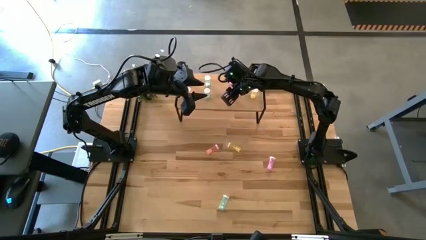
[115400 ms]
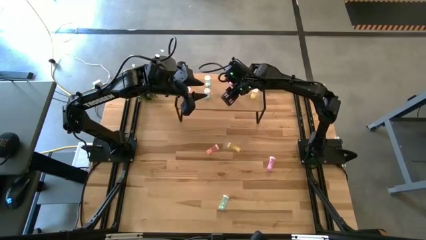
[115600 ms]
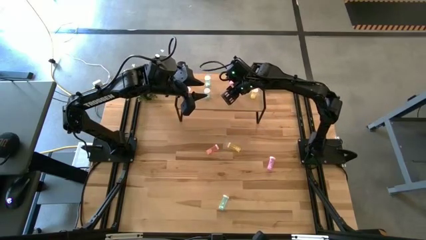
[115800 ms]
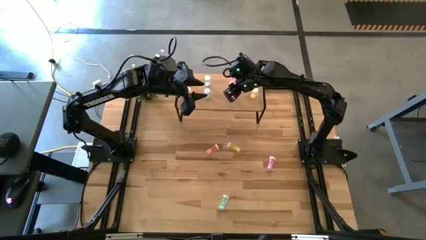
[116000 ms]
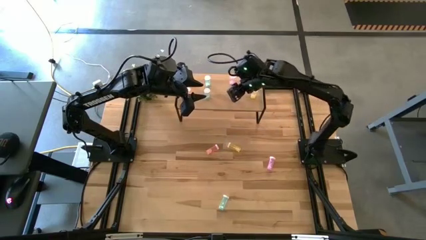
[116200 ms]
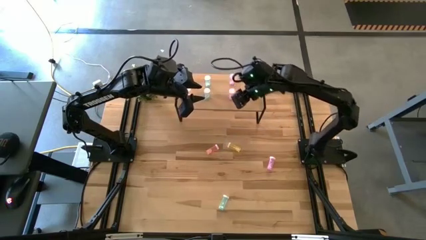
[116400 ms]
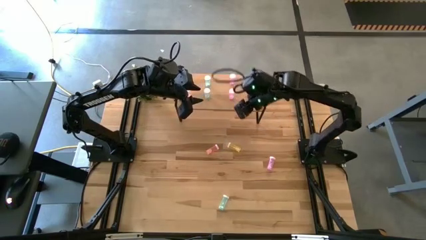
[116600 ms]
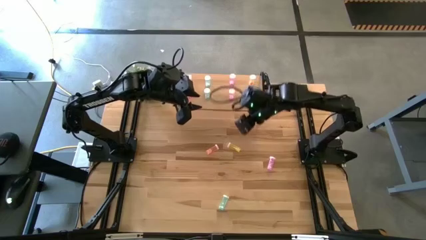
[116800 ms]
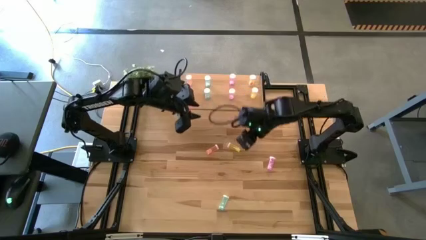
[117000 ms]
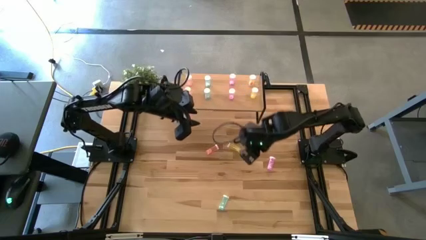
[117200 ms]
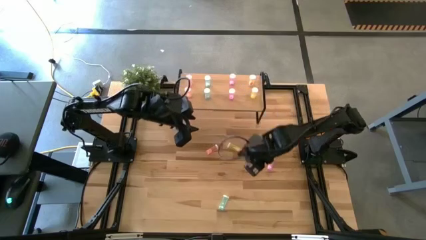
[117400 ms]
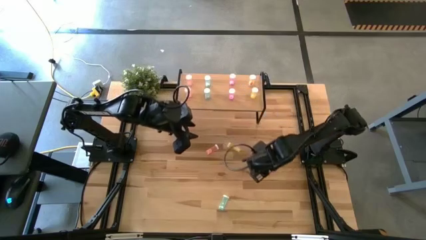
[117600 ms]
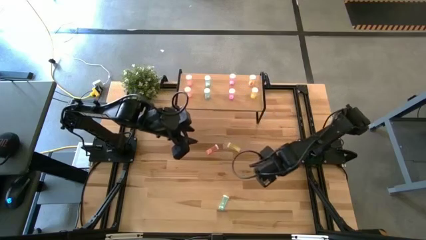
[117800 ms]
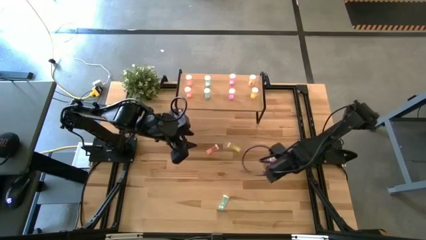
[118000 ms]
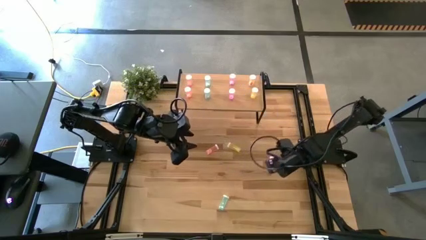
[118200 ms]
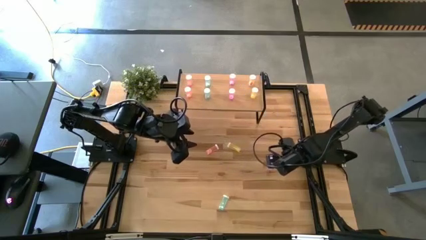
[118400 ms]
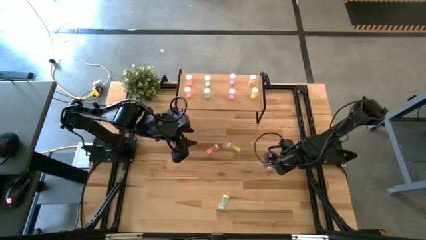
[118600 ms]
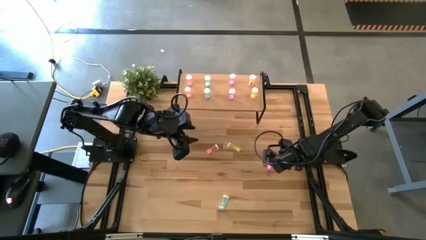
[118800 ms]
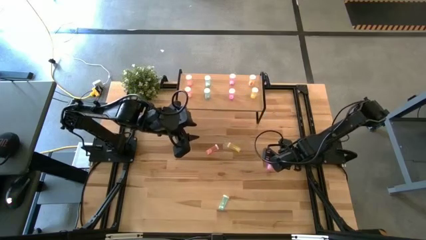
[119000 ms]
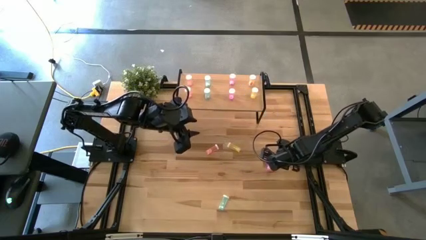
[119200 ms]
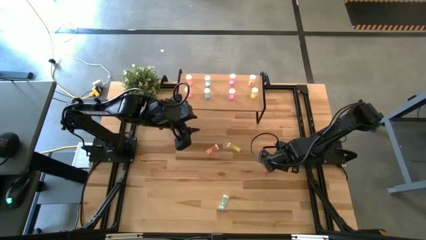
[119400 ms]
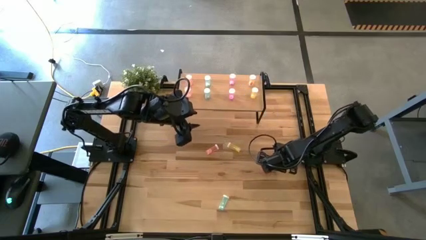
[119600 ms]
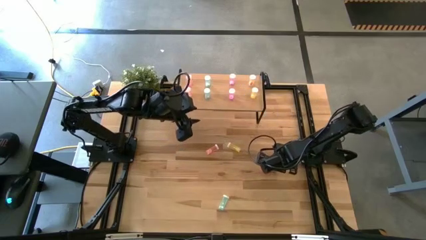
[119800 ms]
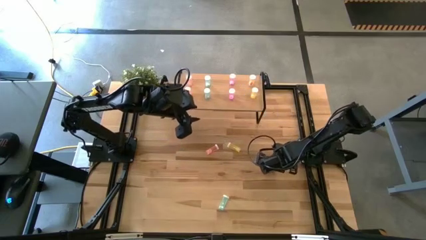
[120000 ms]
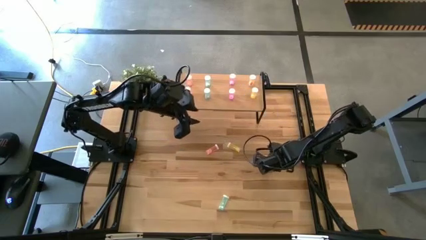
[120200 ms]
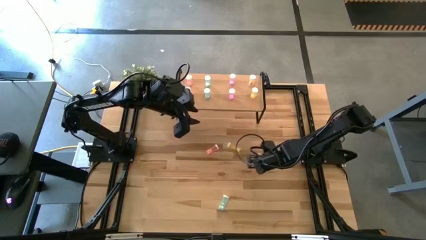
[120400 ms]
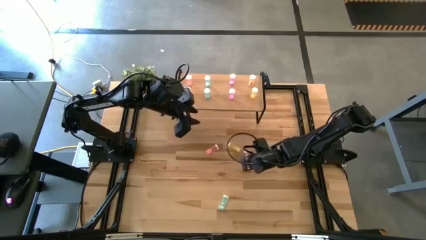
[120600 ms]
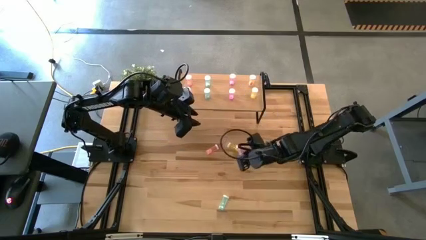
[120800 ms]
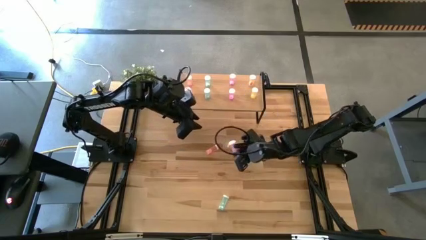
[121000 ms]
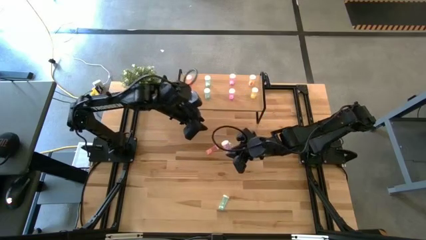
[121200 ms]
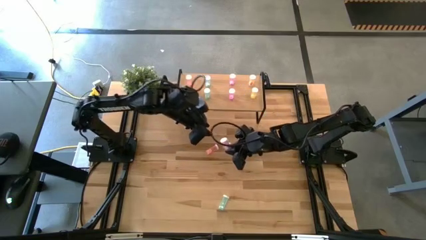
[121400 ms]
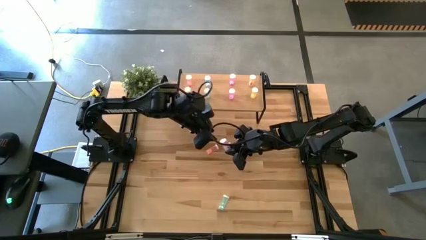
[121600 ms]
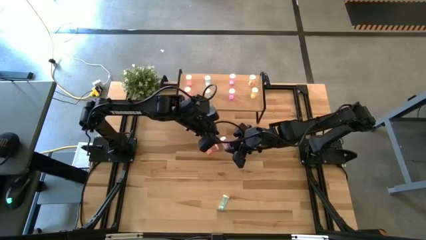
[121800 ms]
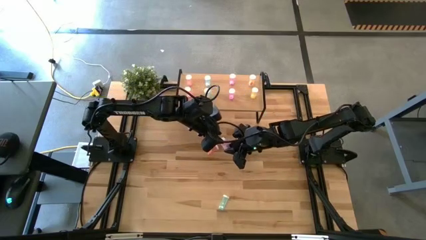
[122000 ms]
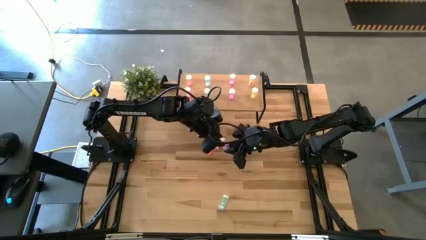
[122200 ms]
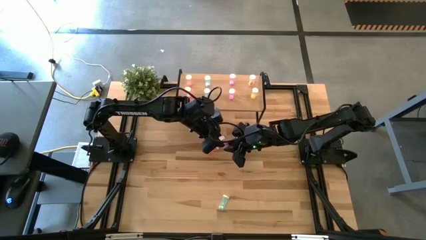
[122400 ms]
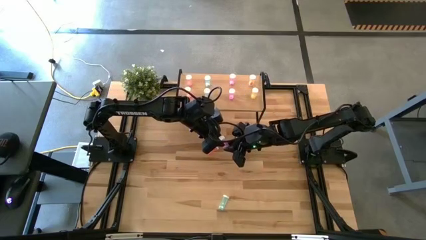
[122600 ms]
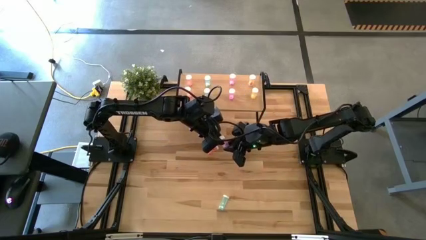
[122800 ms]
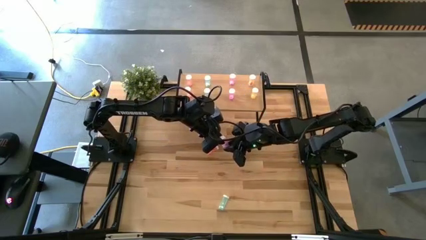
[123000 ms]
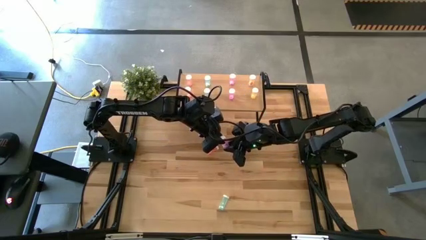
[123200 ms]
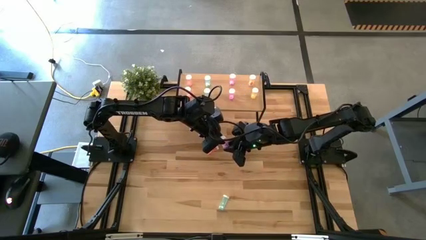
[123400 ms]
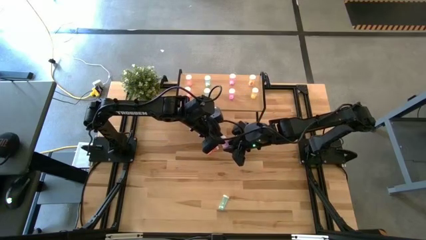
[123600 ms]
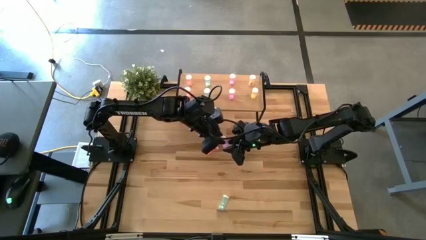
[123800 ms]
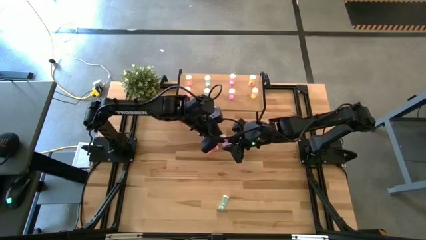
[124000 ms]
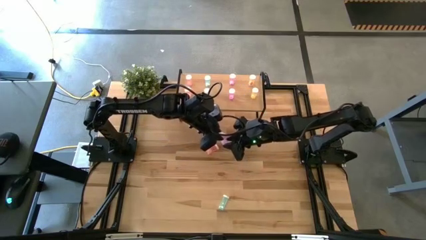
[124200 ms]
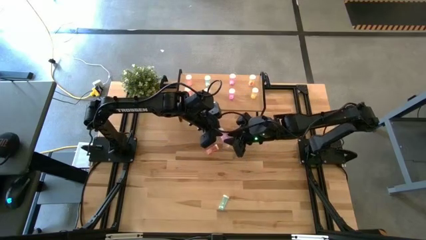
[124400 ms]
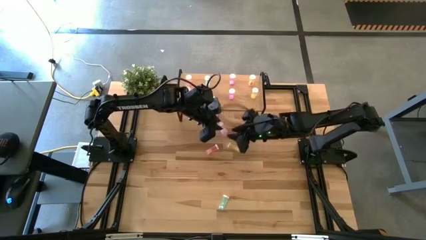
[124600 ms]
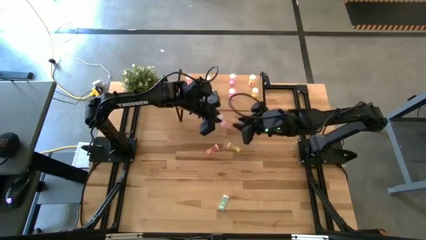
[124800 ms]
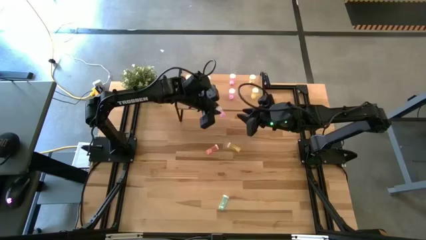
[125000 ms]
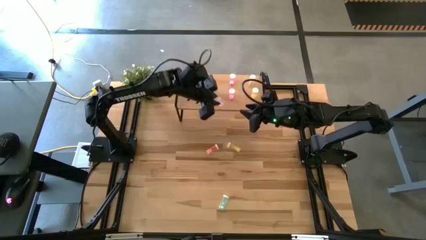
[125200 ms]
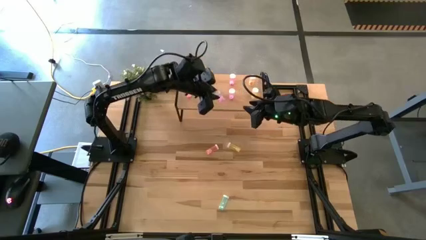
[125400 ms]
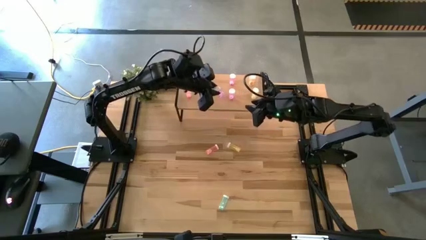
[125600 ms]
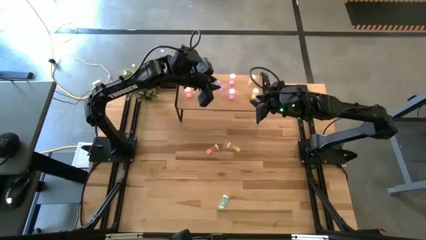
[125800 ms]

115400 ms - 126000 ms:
Task: Pick and place medicine bottles onto shelf by color
Put the purple pill bottle on the shelf aligned with the other purple pill bottles

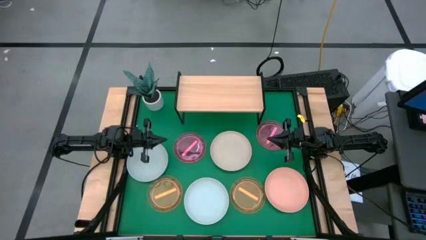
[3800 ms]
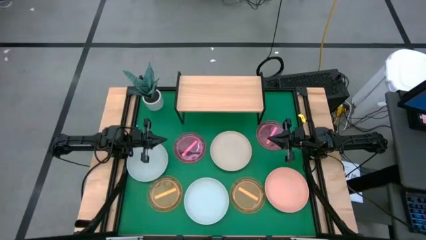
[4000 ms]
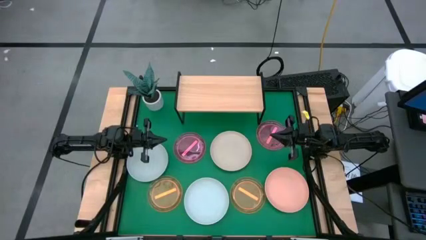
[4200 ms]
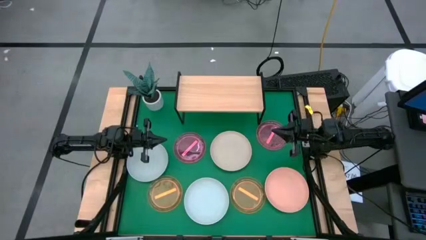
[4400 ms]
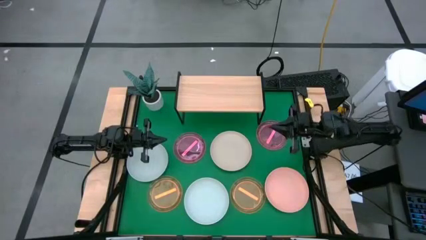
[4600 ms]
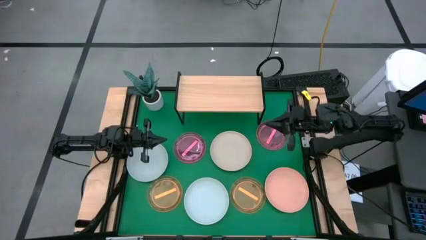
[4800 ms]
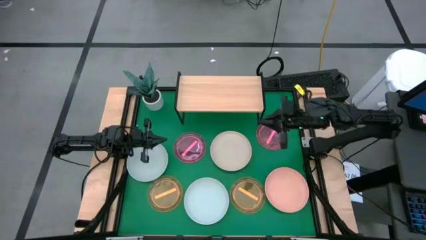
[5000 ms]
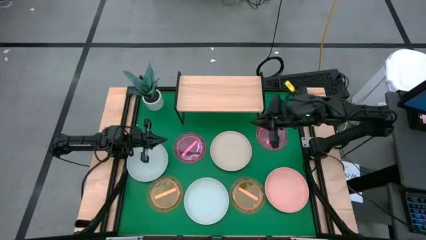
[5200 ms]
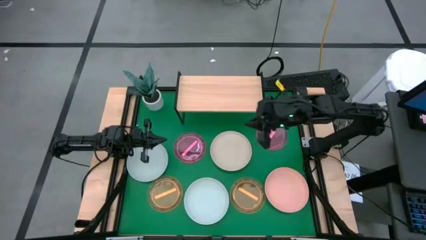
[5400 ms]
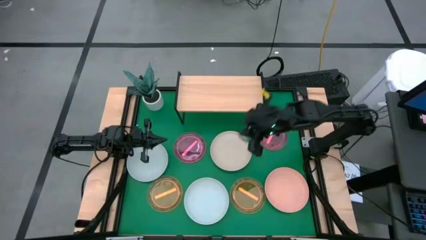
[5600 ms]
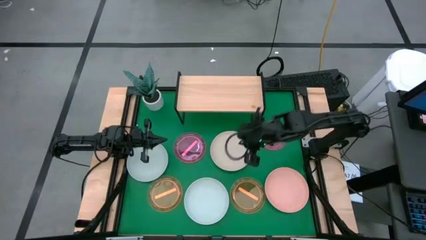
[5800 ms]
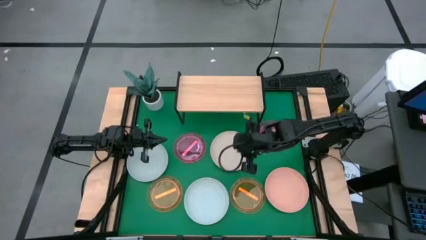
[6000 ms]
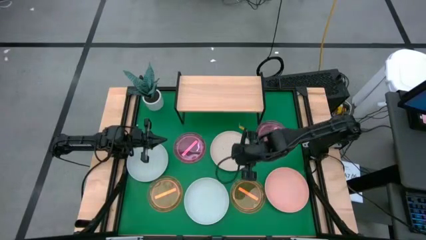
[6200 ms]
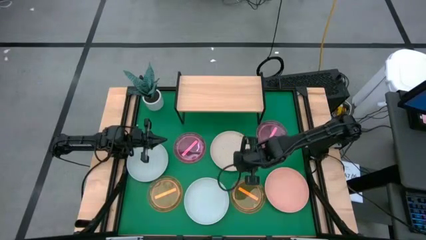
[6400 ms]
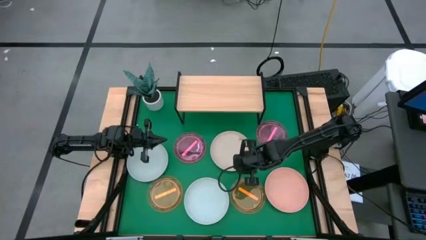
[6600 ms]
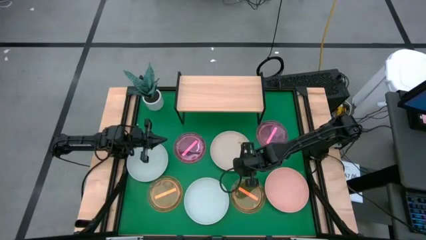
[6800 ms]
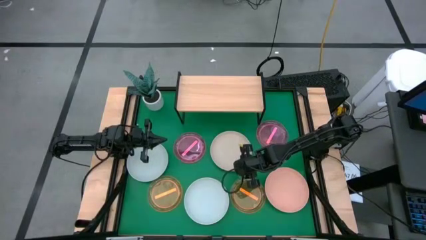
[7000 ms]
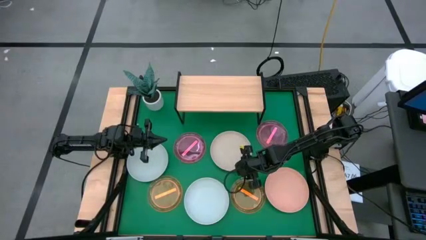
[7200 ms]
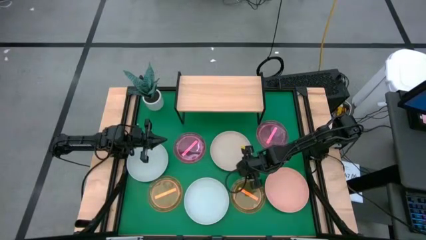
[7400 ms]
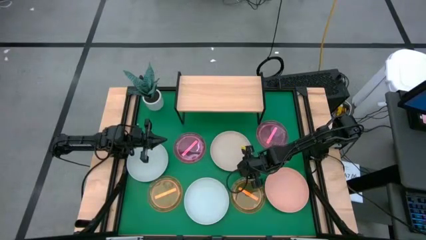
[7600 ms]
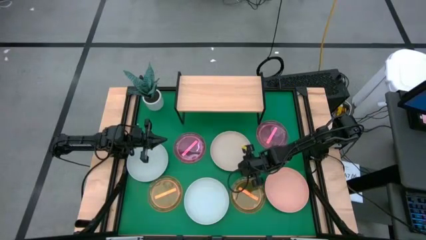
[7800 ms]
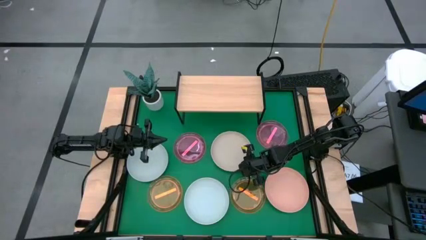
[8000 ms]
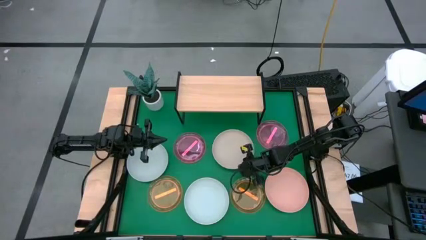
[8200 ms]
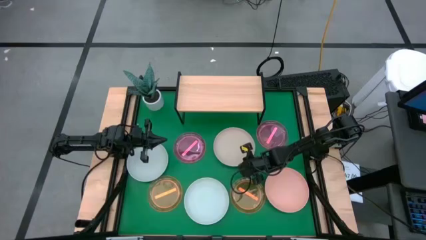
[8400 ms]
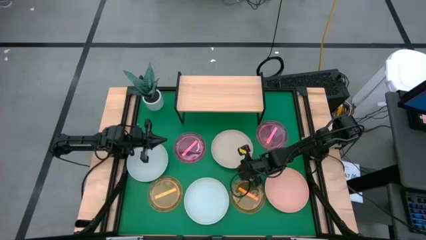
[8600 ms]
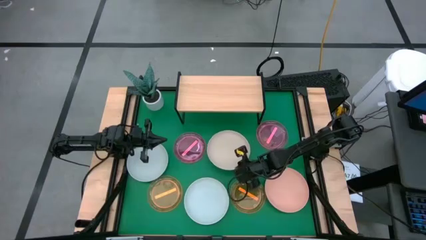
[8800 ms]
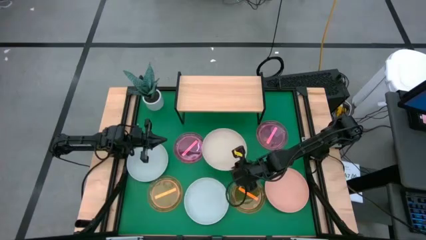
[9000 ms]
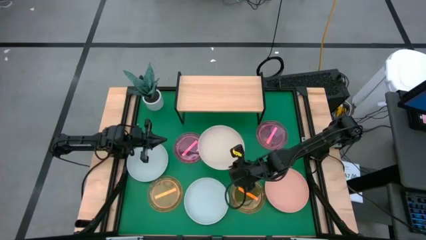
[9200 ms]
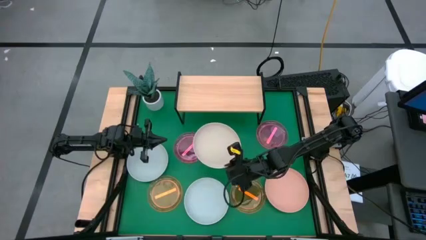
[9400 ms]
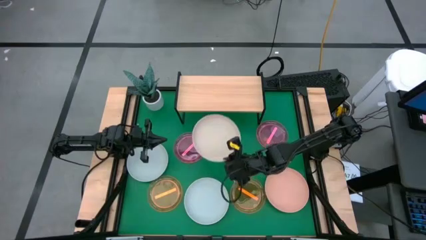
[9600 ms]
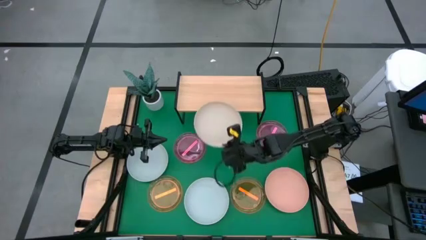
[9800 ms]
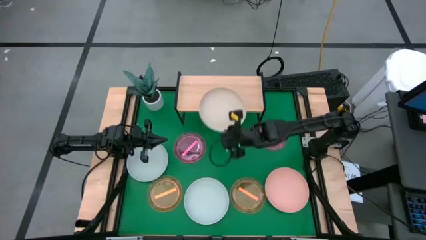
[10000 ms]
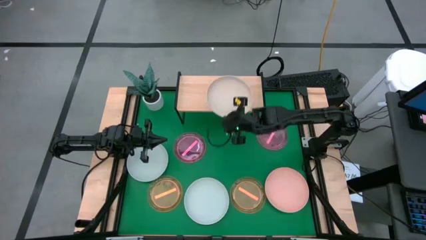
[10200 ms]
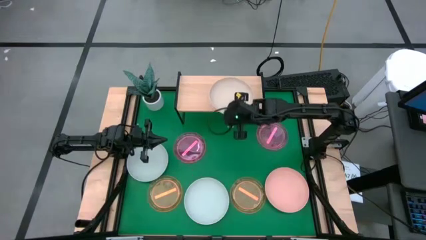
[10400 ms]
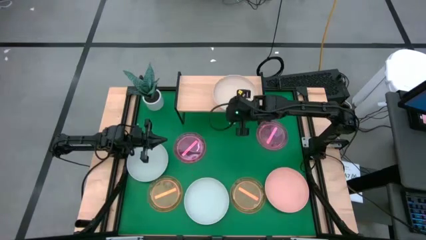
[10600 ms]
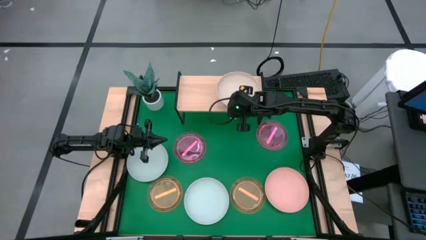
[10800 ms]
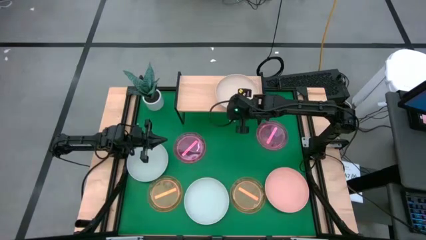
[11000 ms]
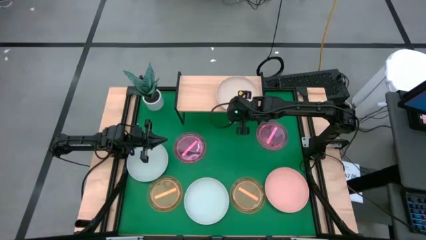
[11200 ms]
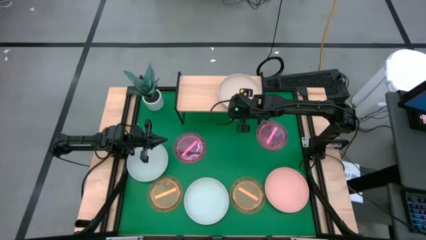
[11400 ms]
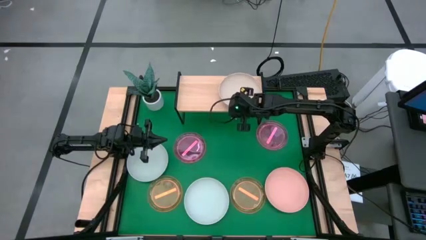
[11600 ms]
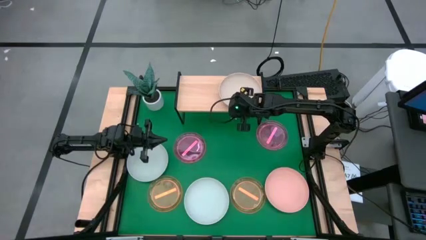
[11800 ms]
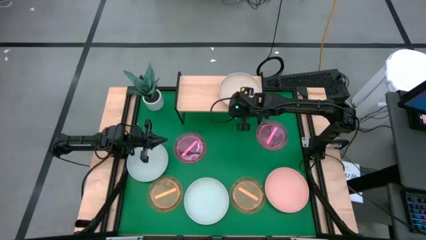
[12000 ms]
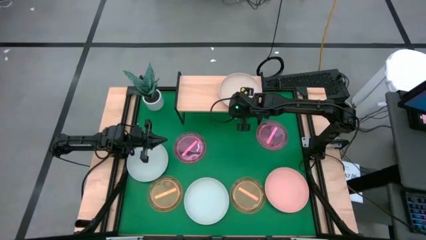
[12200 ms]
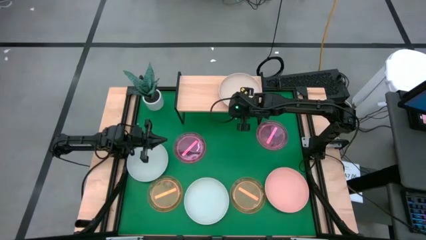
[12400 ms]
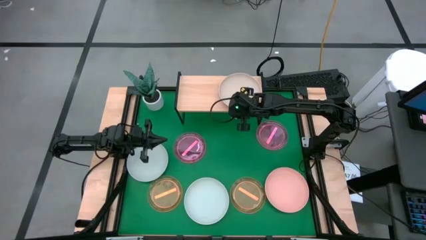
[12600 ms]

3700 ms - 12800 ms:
Task: Place and stack plates onto a shelf
Put the light brown plate on the shelf
